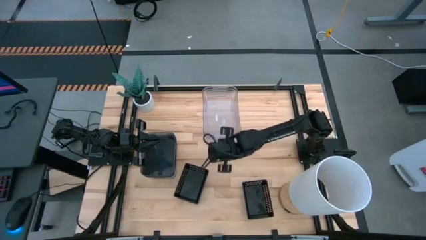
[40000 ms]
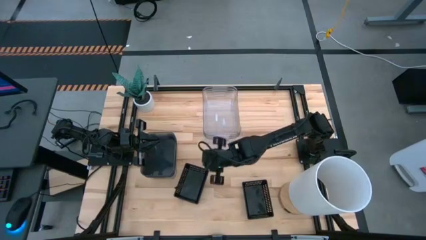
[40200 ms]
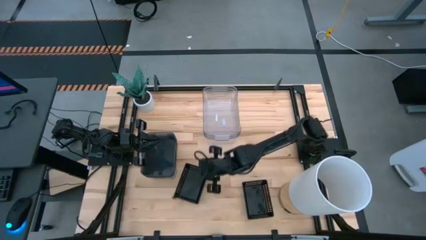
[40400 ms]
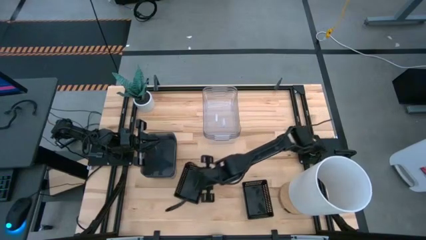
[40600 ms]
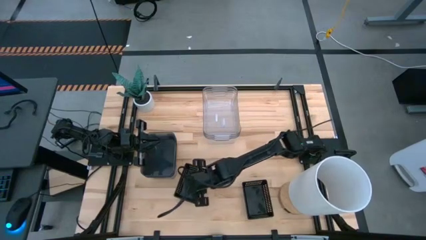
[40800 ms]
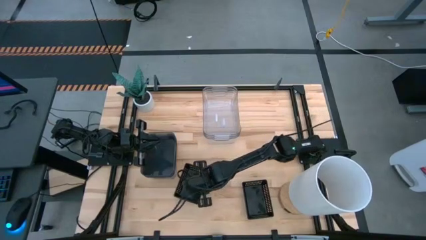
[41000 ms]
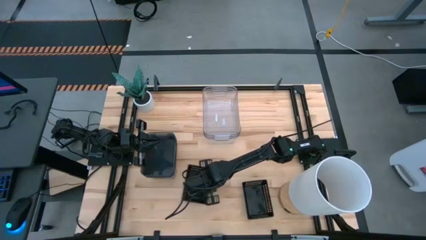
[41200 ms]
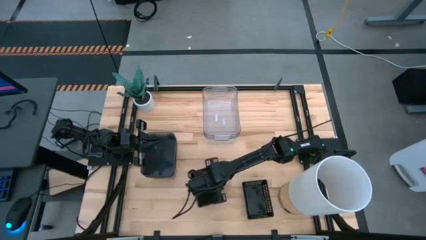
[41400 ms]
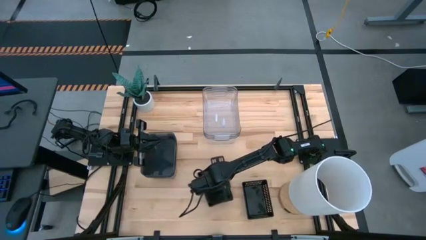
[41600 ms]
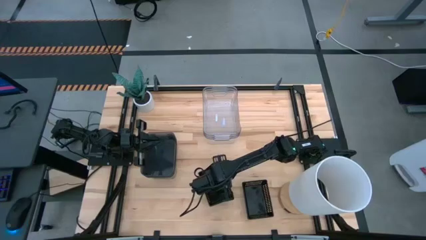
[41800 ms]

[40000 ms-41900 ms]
Adjust the stacked black bins

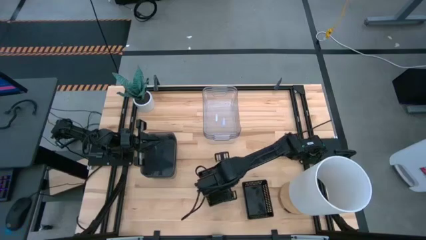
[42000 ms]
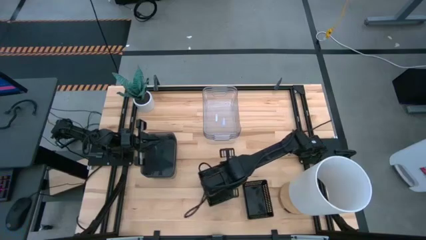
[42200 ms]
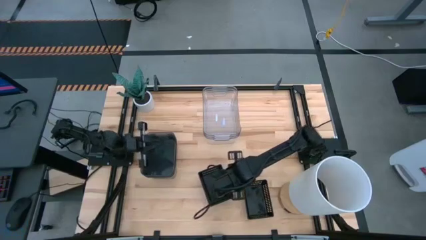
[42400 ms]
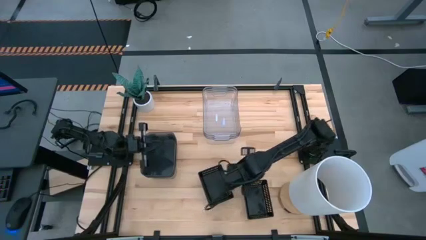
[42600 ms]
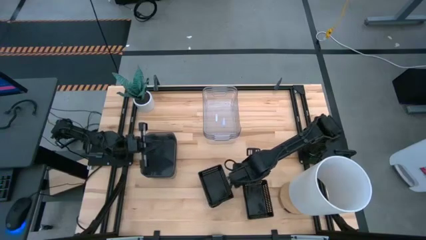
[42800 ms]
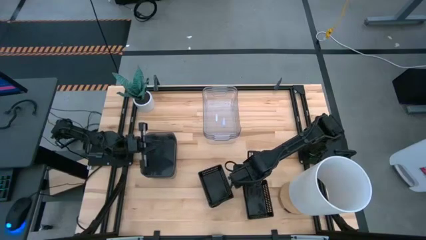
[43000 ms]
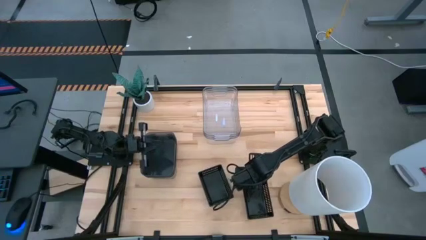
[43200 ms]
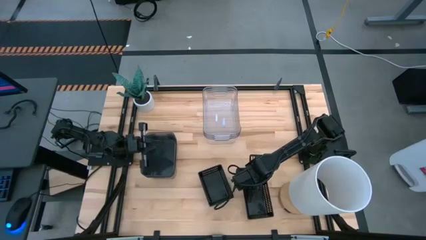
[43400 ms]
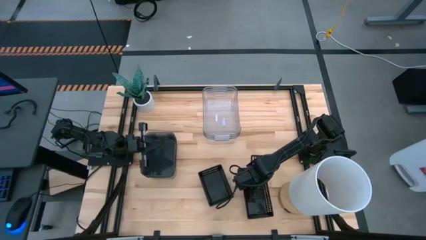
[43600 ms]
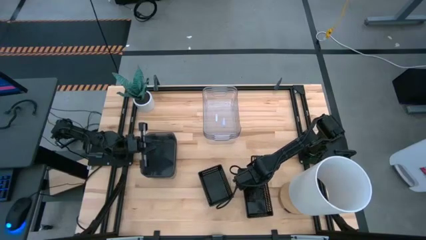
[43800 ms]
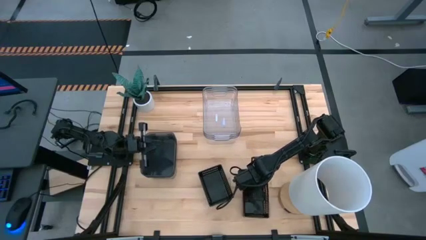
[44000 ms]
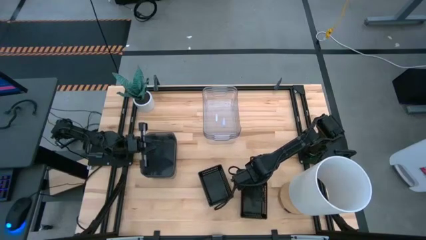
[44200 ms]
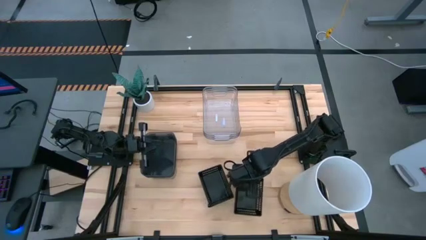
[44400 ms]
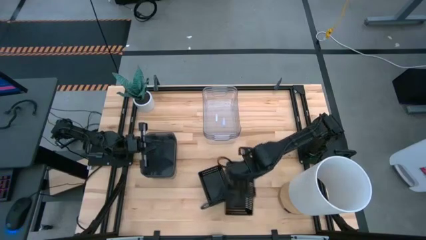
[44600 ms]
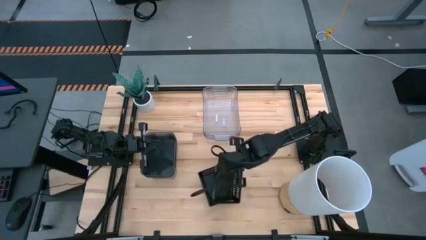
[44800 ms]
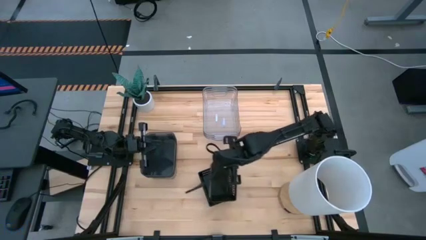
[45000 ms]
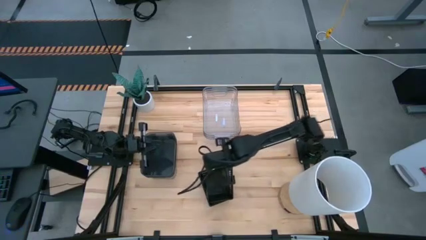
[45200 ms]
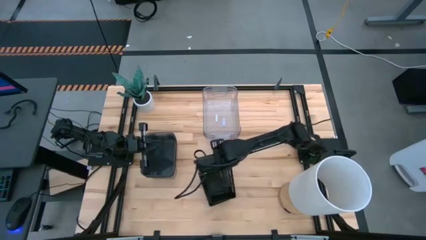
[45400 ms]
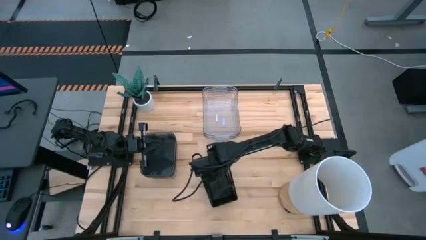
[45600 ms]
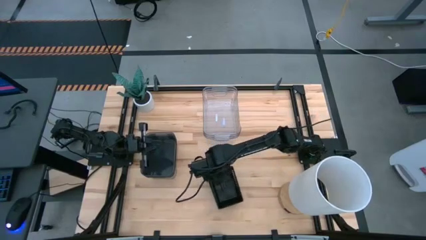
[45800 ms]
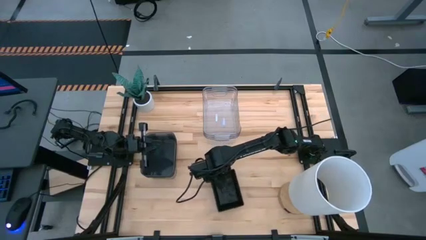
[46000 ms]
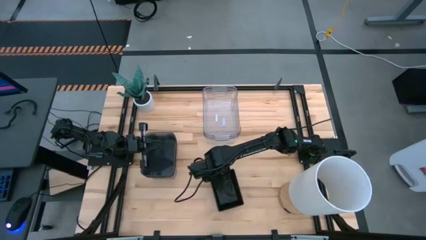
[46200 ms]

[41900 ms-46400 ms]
Stack the right black bin on the black bins

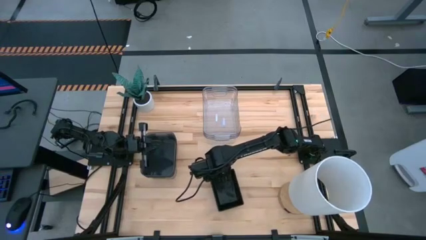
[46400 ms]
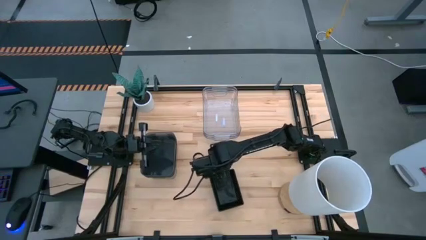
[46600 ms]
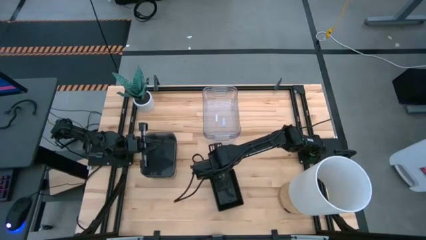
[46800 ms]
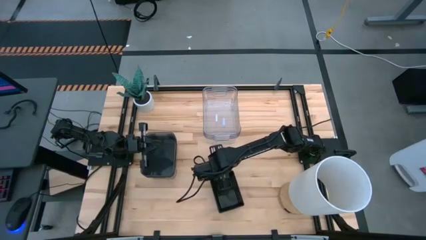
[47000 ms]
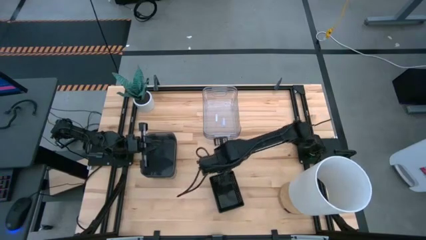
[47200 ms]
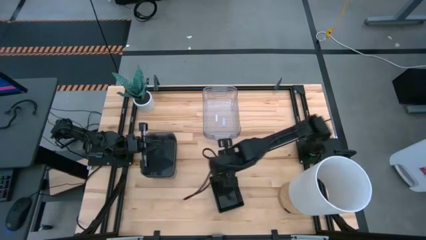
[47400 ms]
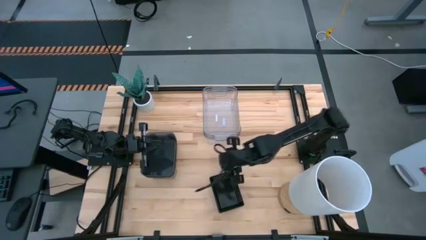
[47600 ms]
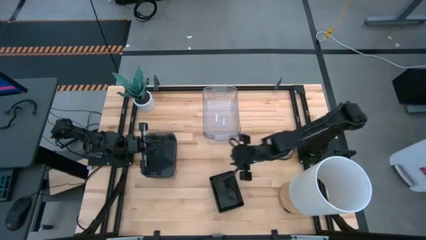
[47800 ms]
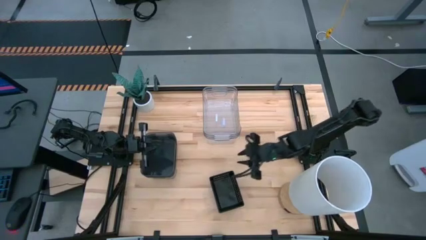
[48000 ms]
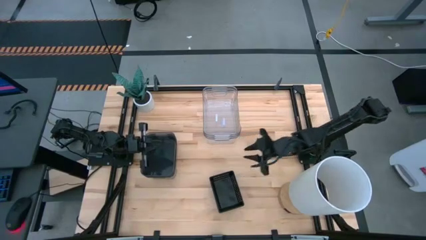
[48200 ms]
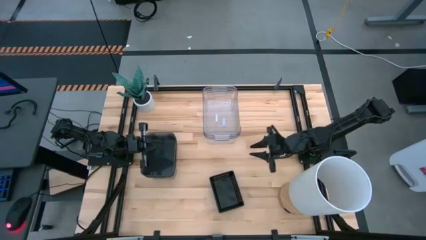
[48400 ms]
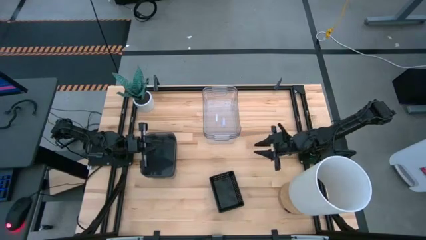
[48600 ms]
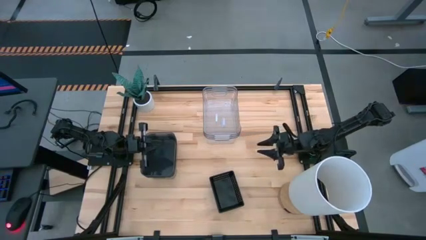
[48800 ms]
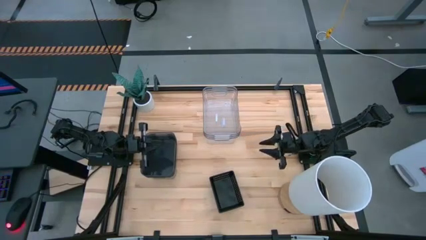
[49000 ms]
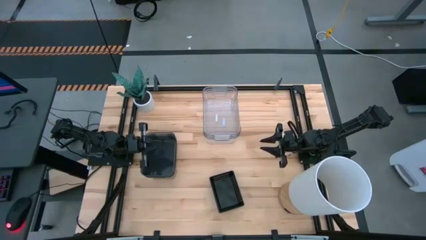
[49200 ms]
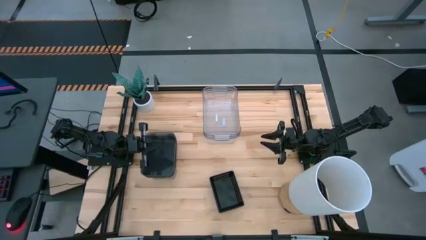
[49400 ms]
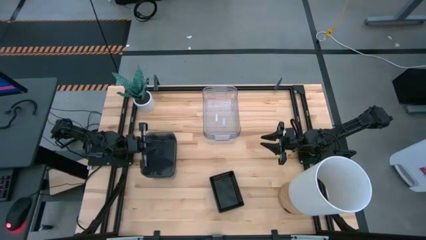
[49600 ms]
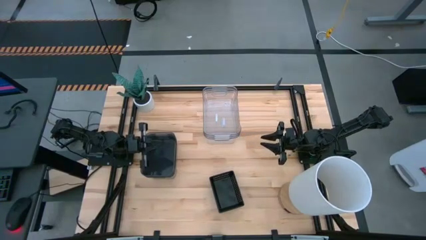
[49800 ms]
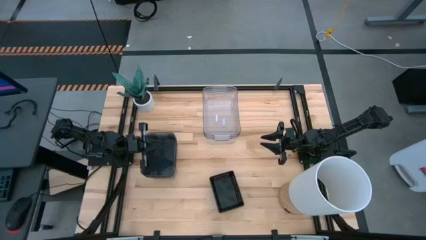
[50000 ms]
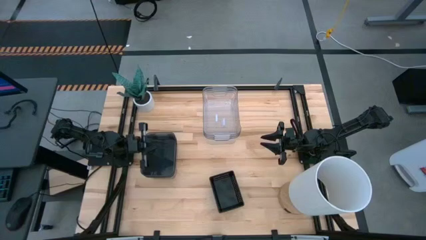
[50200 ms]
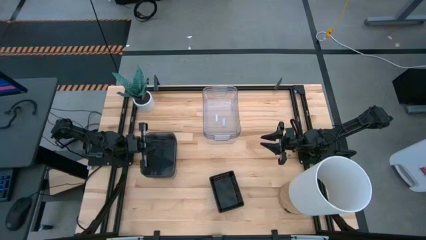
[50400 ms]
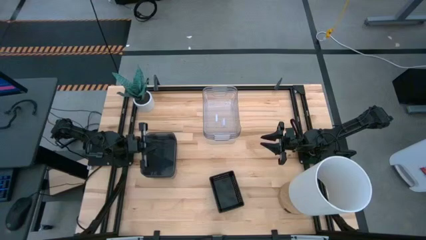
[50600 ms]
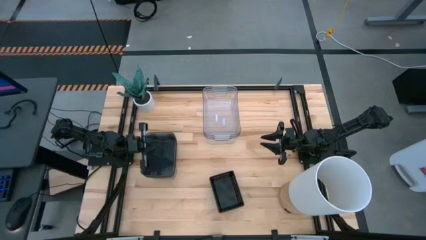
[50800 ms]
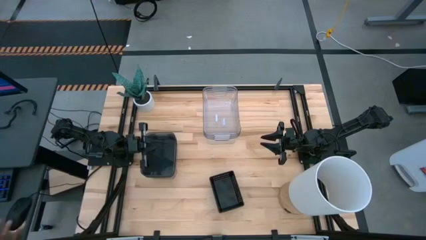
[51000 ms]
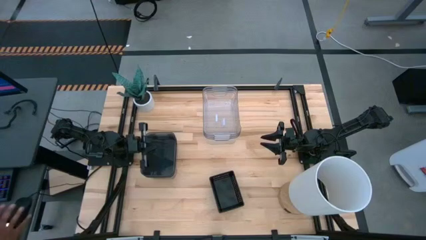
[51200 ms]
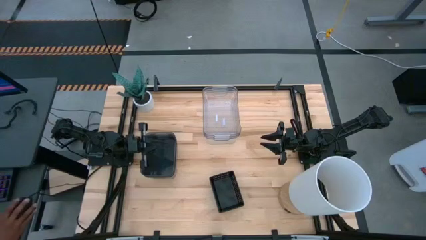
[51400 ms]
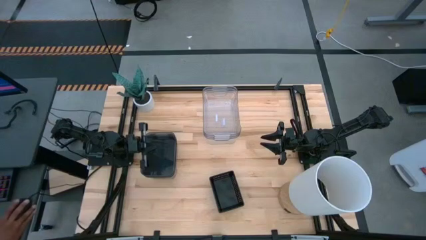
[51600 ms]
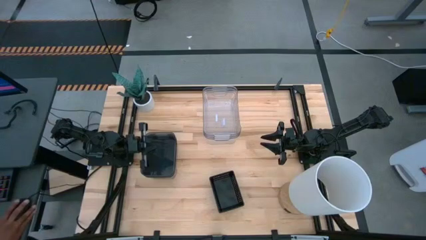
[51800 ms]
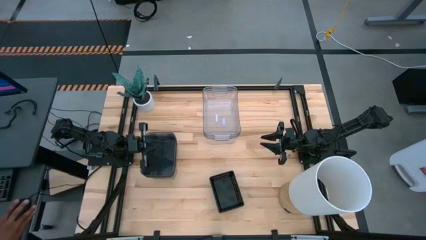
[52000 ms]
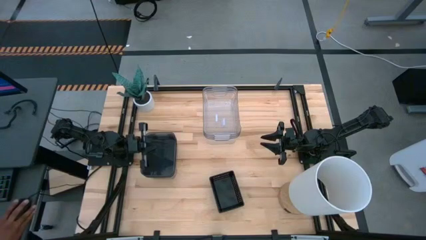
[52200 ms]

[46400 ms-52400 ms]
Return to Home Position

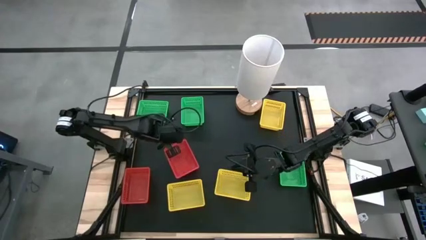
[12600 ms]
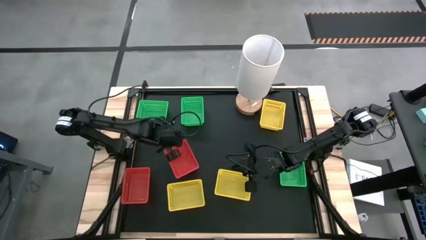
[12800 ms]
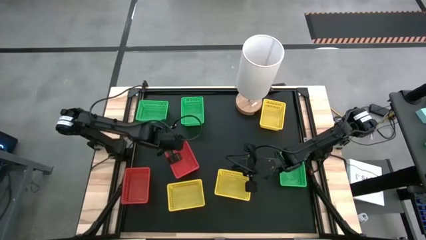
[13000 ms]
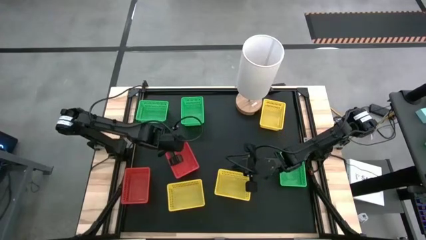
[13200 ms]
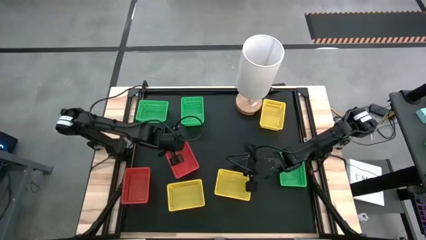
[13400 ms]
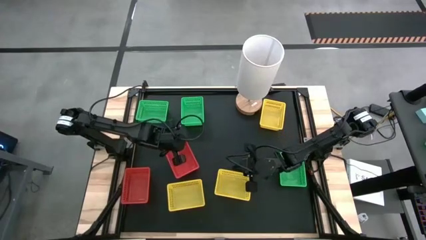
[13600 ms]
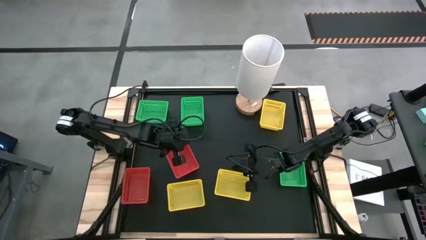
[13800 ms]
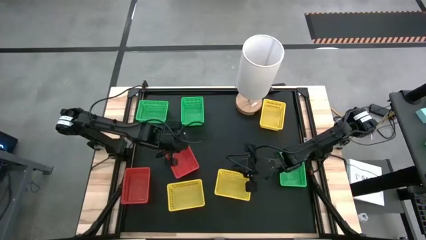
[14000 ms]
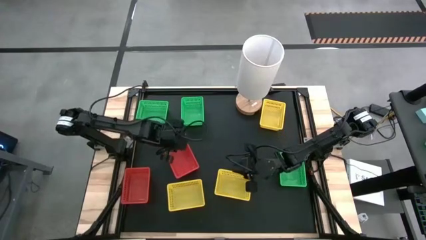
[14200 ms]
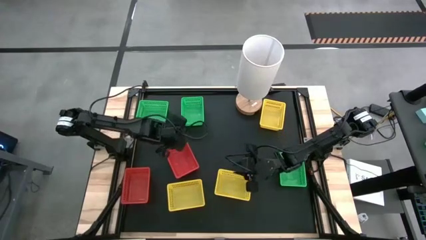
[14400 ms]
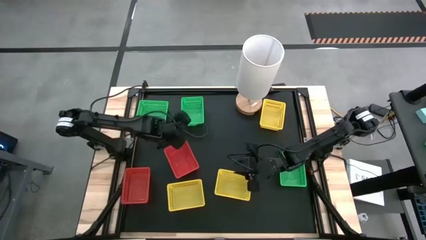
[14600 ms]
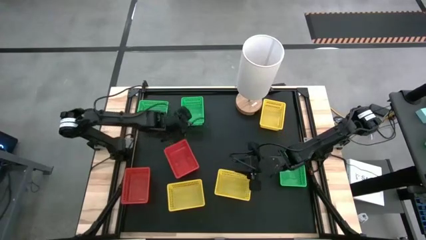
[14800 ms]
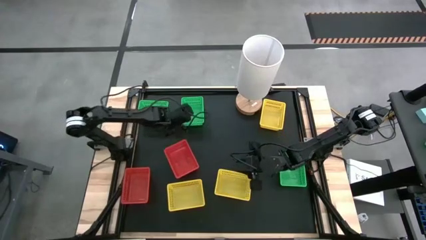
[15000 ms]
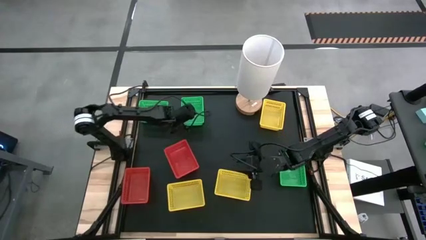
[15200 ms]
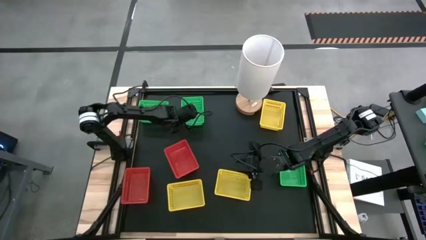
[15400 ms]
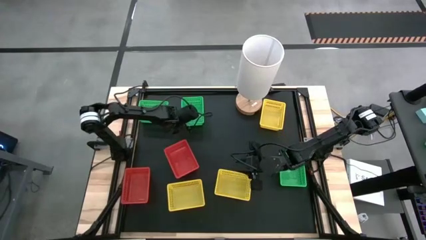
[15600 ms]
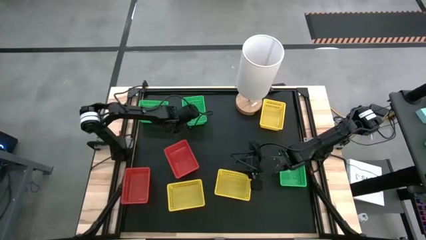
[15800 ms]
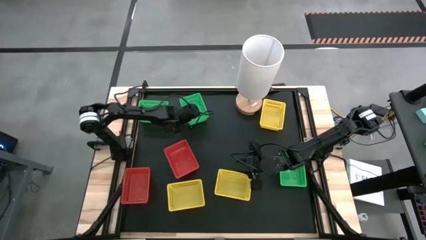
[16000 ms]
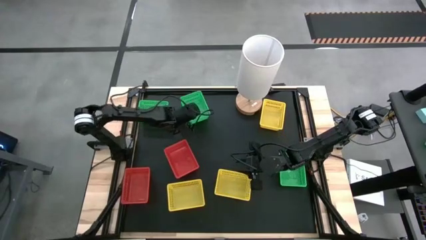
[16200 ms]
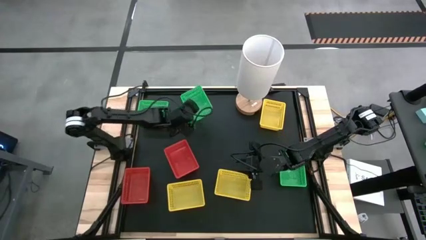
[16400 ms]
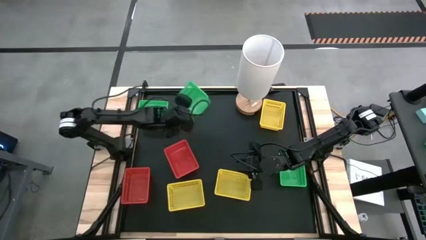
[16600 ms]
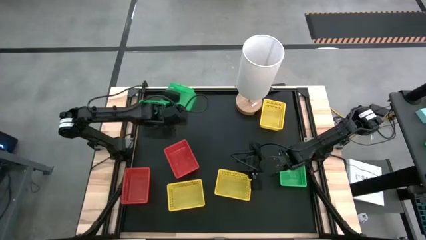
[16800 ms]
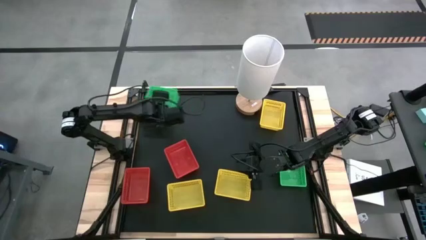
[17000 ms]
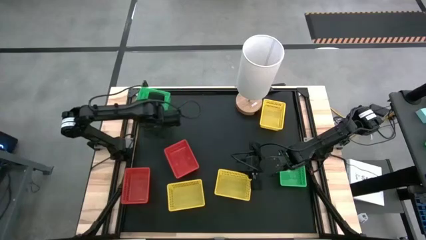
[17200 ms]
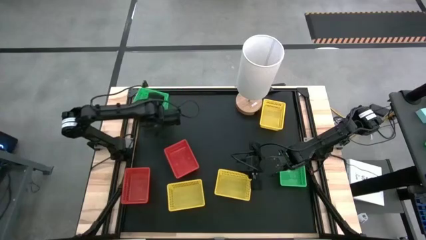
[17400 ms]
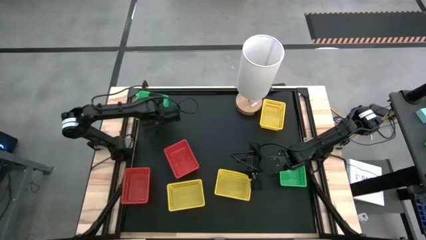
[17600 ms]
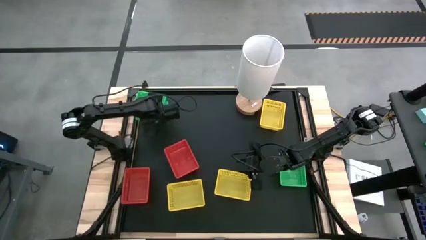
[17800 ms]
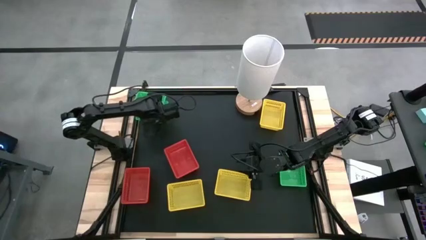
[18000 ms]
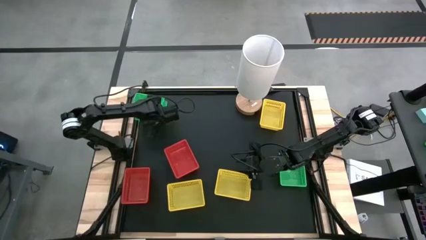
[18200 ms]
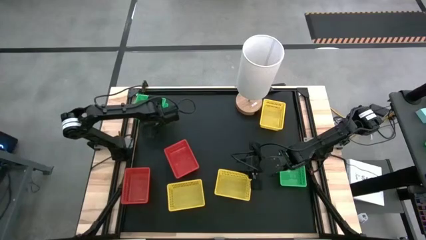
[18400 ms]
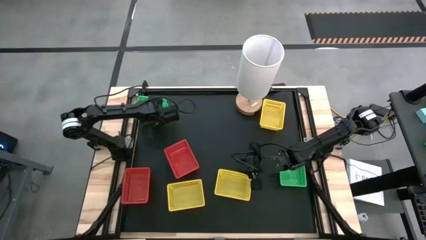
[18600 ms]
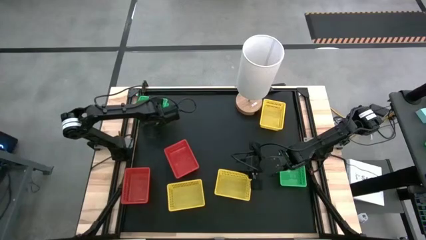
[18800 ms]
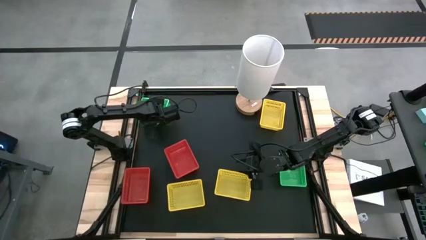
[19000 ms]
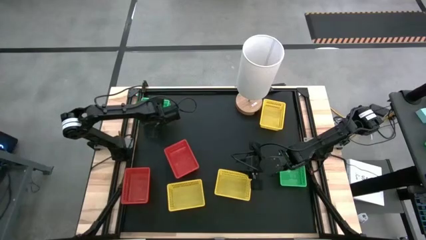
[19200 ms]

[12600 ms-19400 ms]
Stack the top right green bin on top of the top left green bin
